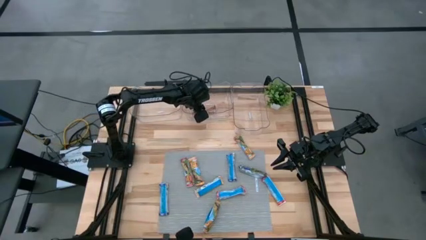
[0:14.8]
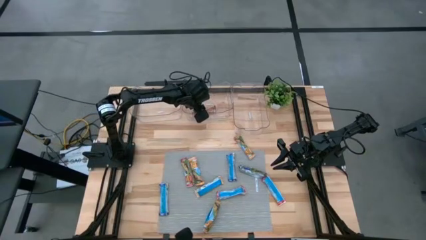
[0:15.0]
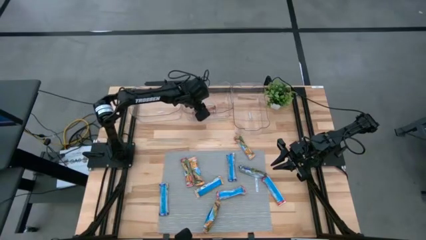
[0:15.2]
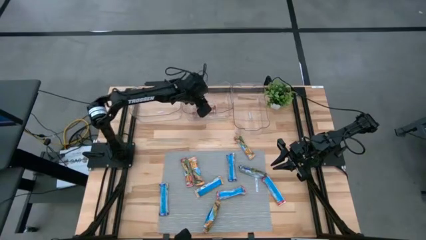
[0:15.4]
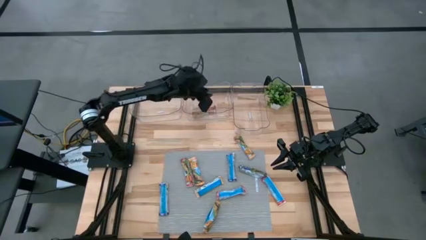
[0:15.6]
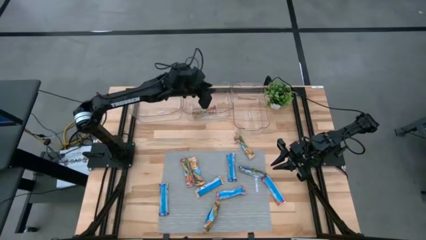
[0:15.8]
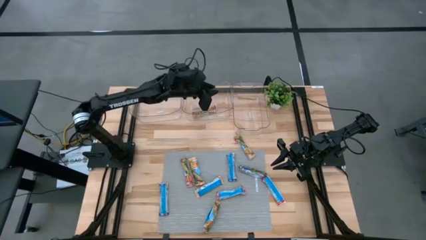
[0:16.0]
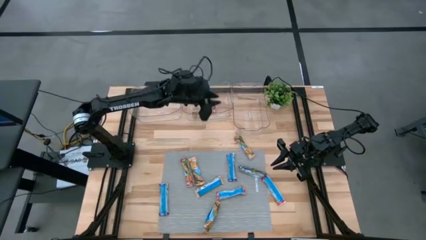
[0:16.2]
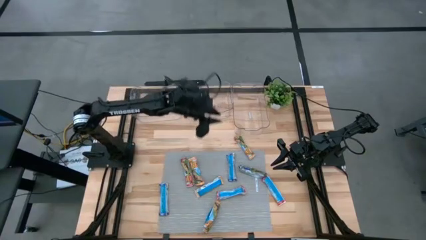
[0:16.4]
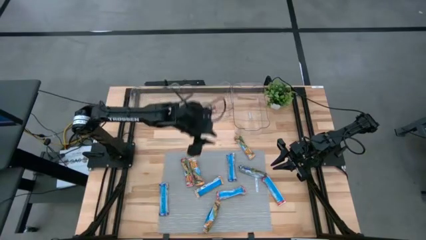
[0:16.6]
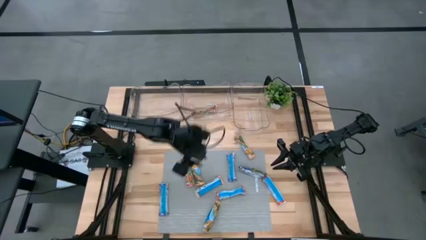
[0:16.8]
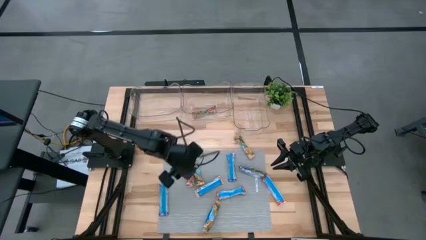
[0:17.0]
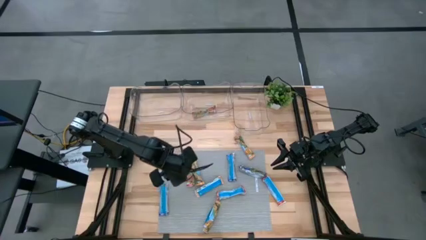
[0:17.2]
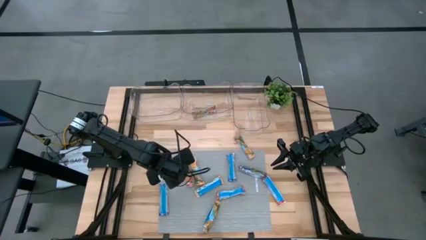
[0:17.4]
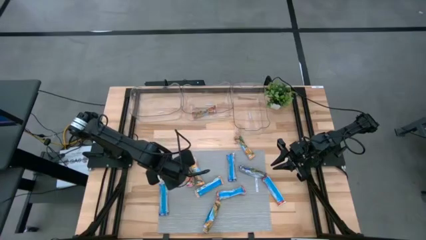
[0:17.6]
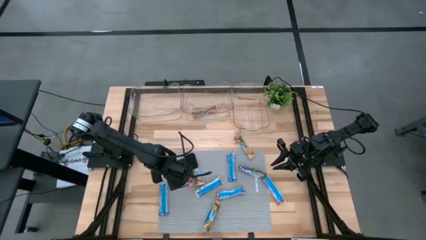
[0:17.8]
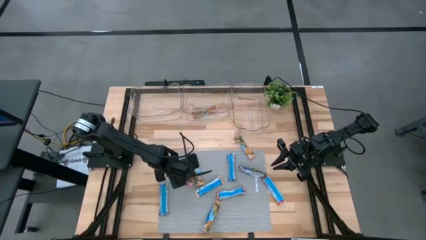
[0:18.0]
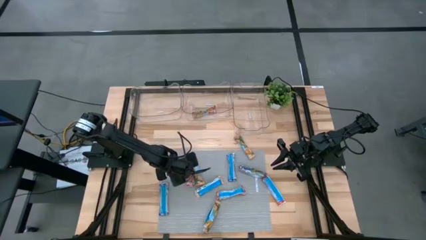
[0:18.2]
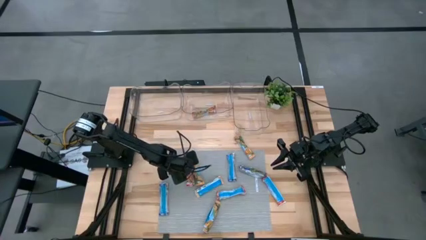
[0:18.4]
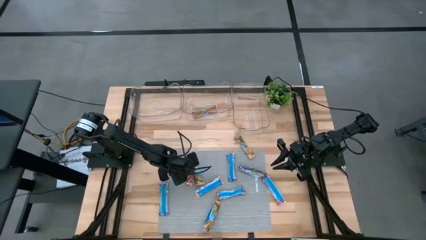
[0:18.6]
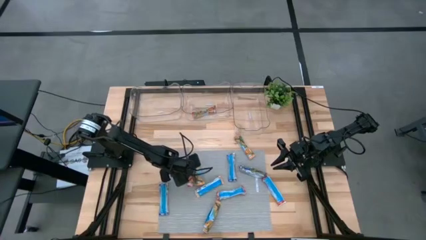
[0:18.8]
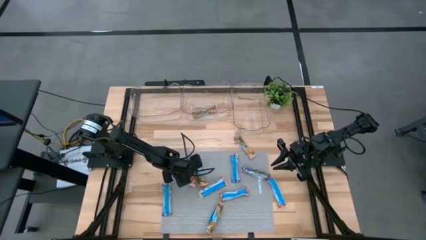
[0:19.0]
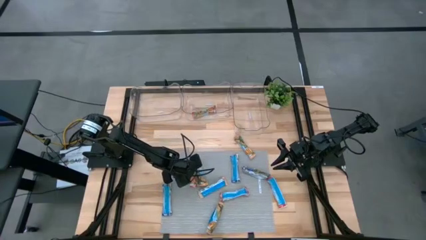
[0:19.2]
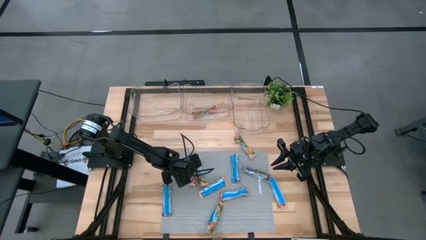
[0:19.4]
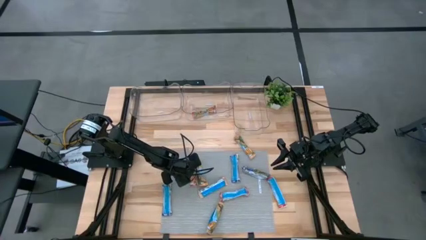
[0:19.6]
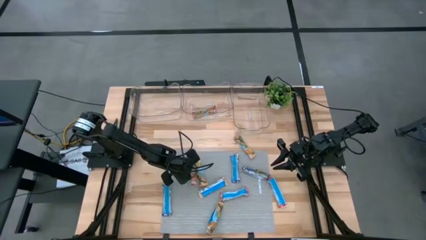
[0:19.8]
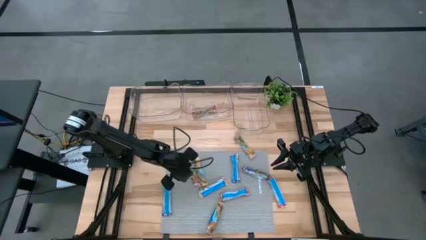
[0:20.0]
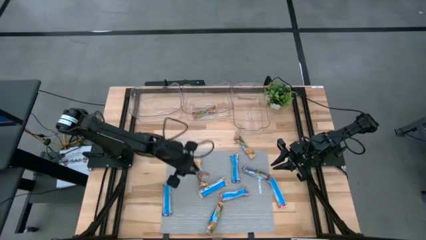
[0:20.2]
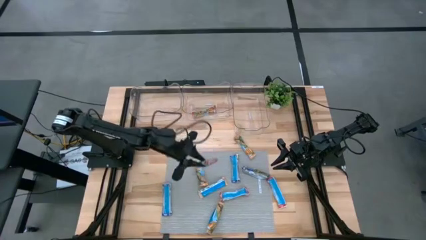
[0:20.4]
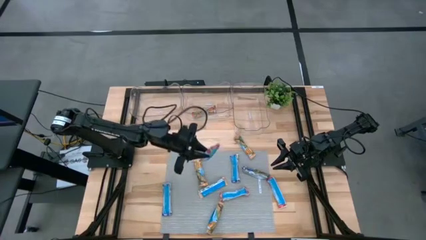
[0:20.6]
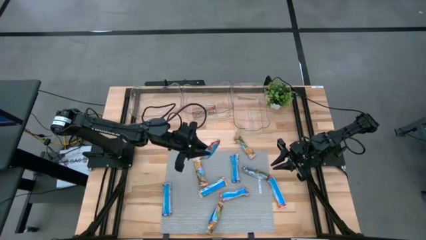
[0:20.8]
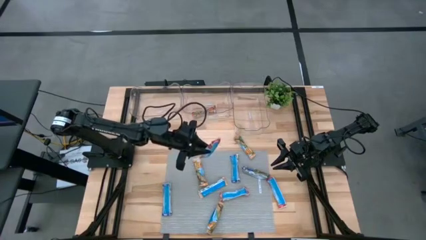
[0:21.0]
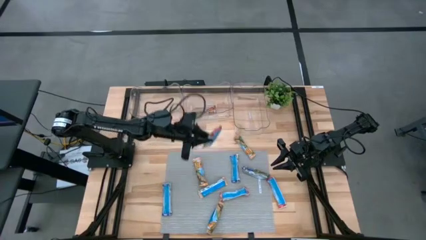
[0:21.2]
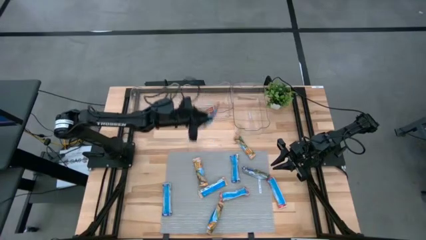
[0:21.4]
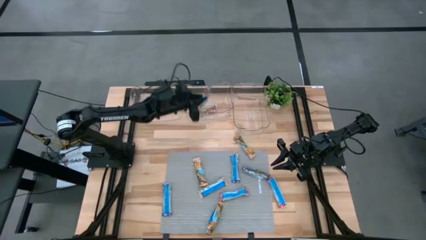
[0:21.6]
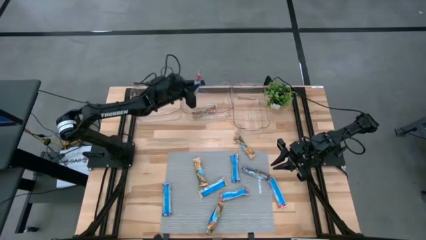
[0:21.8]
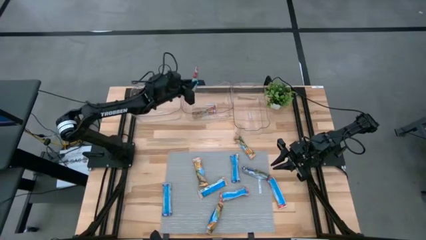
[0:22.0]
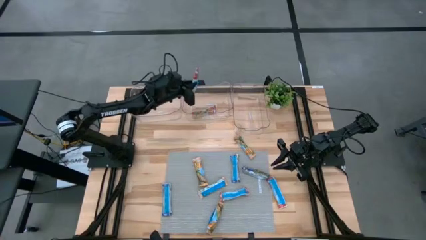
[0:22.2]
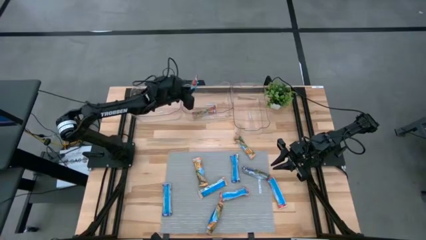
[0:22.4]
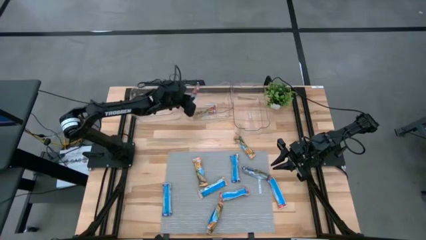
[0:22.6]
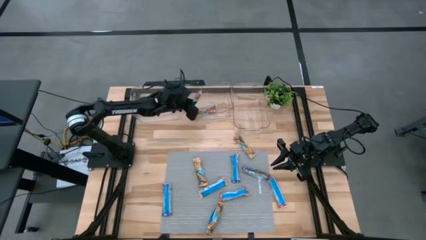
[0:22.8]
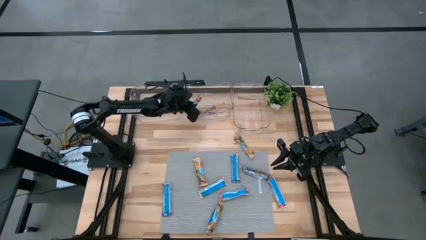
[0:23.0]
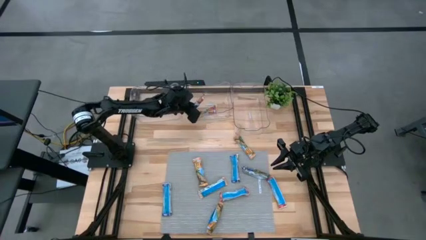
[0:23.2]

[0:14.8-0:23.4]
Task: Pick and place Granola Bars by type
Put the red granola bar into the middle transparent bin

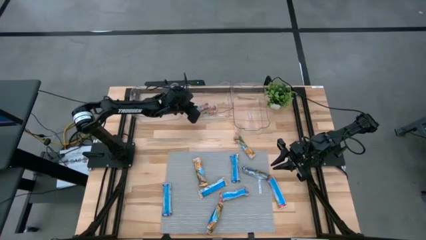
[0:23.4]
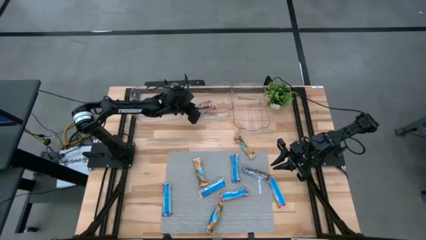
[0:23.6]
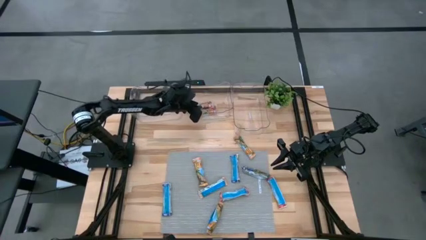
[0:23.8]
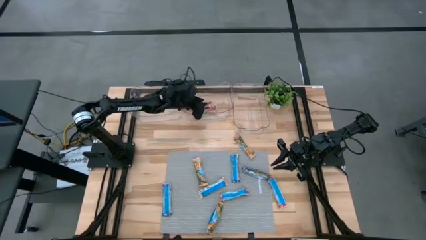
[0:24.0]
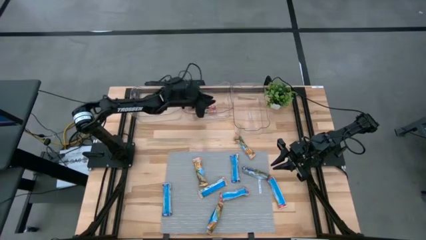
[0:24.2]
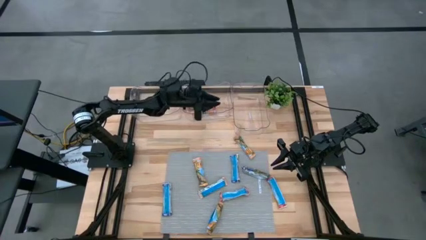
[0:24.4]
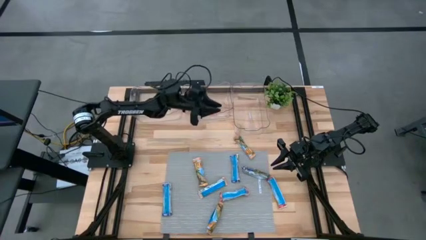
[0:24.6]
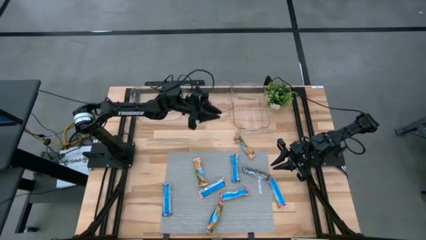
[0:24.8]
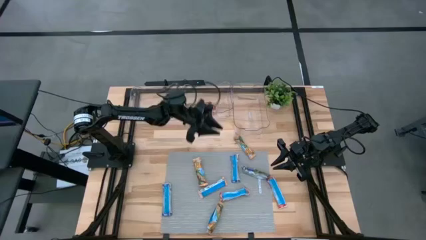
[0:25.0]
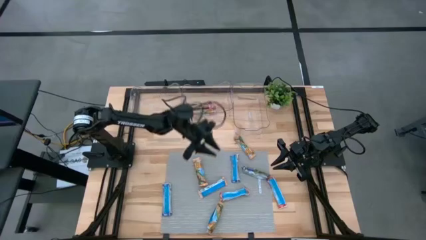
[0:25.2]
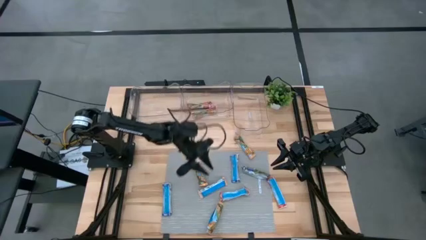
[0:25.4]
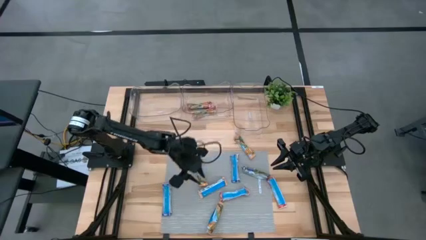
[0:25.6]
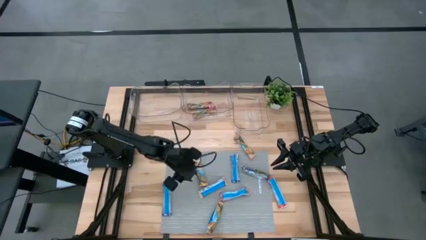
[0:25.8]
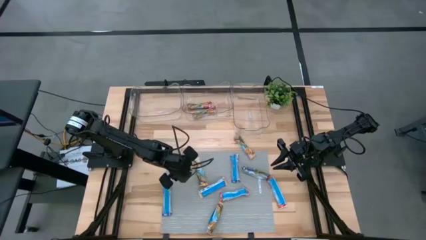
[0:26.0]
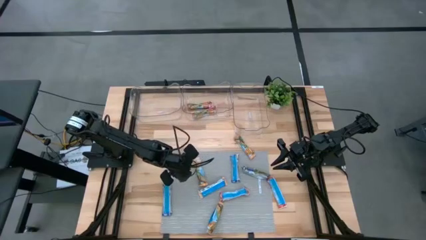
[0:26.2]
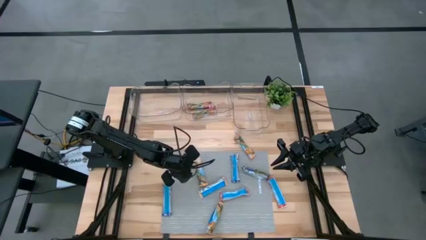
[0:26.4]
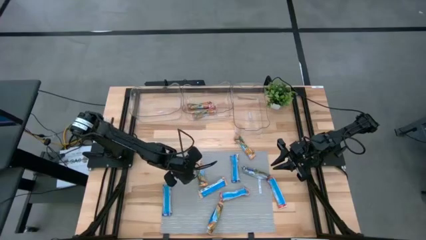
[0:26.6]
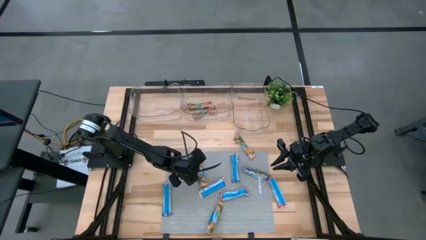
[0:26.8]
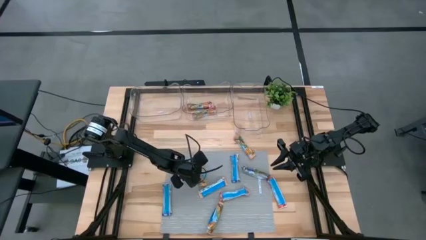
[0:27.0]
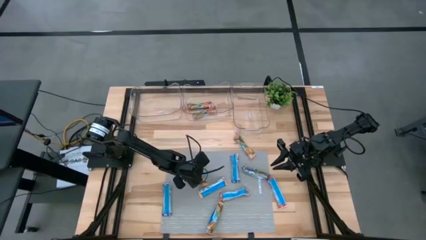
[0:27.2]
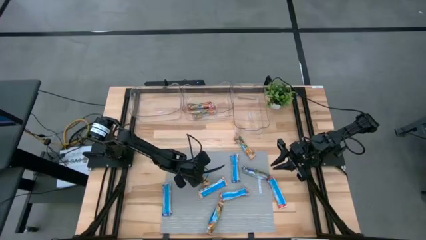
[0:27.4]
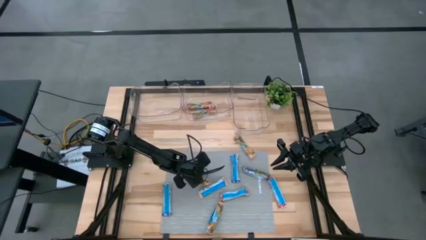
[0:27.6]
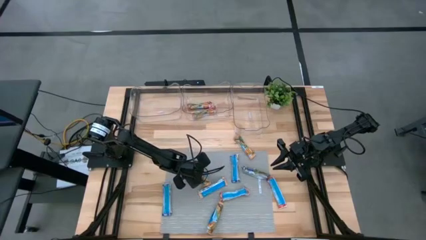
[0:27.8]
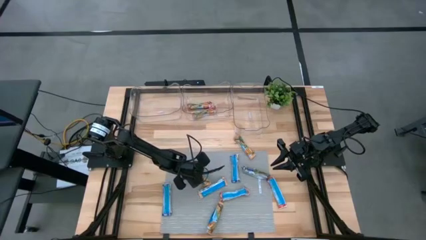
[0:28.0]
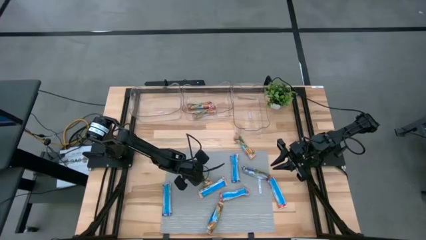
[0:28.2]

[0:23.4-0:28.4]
Put the yellow granola bar into the right transparent bin
